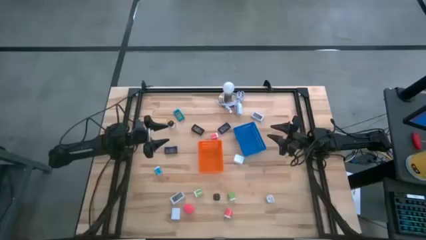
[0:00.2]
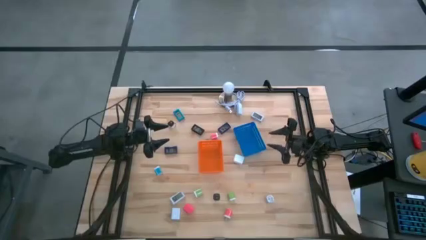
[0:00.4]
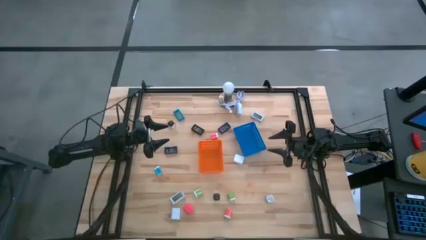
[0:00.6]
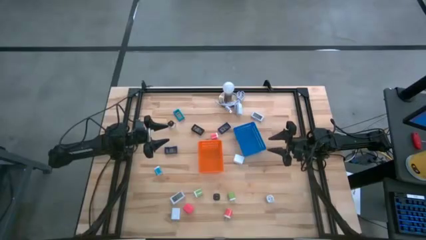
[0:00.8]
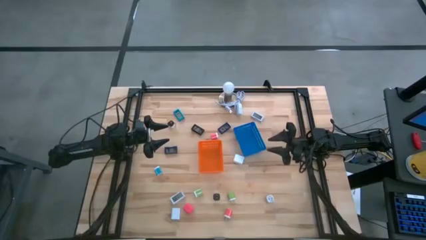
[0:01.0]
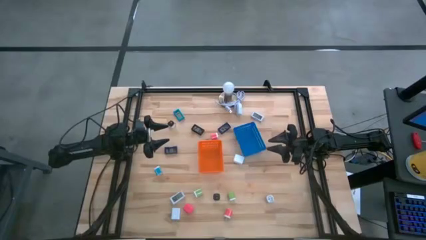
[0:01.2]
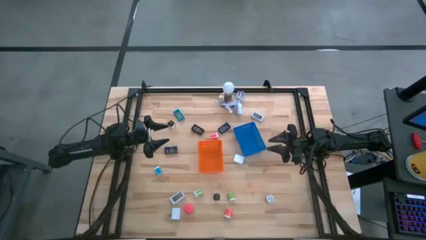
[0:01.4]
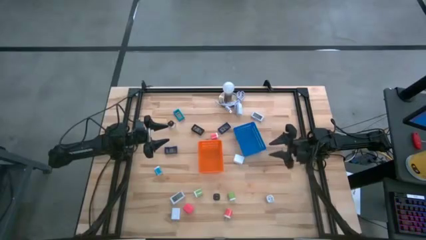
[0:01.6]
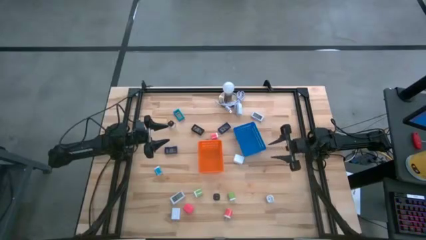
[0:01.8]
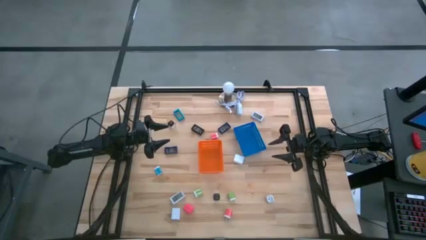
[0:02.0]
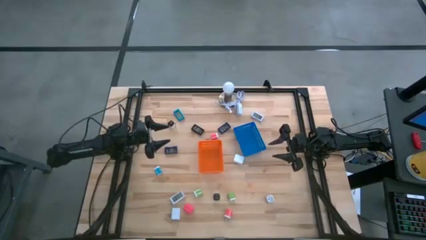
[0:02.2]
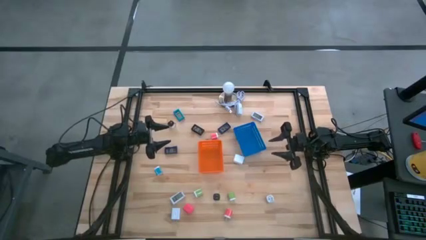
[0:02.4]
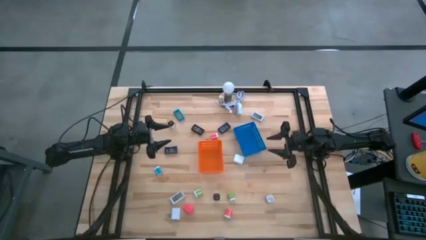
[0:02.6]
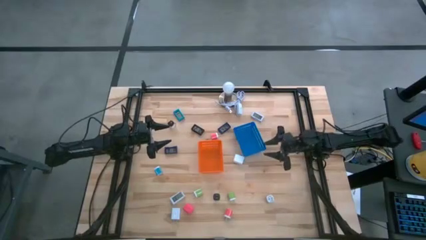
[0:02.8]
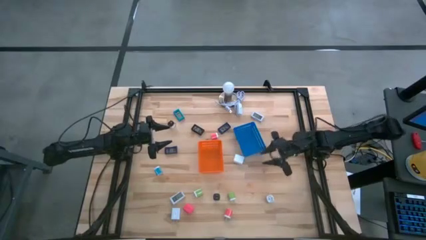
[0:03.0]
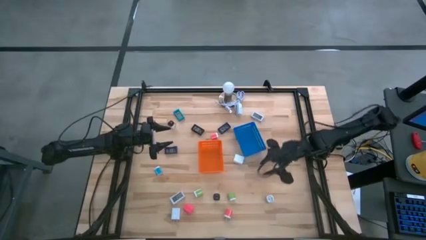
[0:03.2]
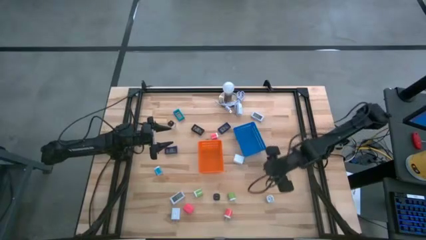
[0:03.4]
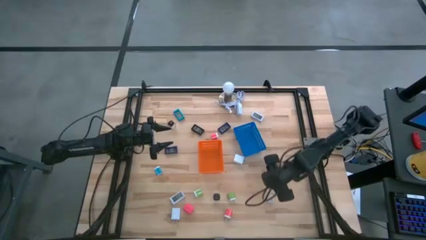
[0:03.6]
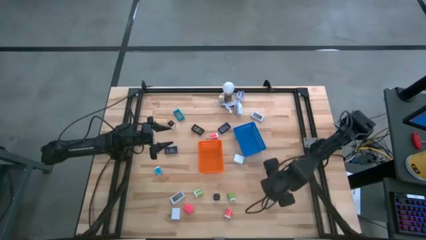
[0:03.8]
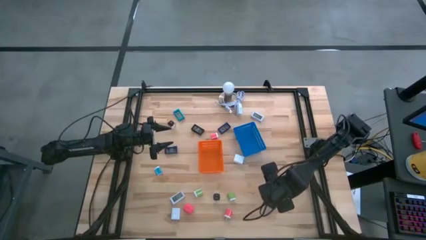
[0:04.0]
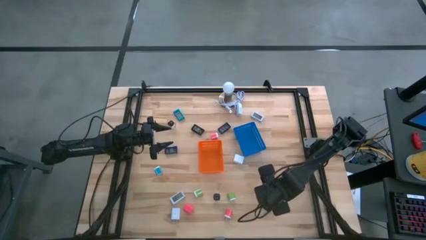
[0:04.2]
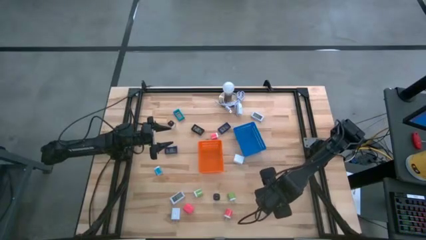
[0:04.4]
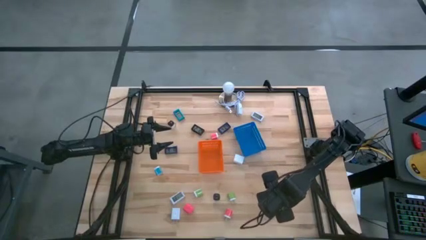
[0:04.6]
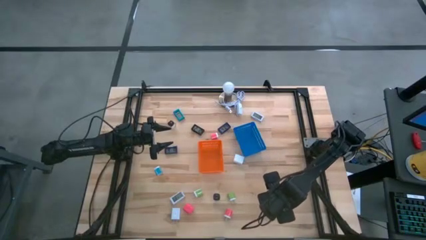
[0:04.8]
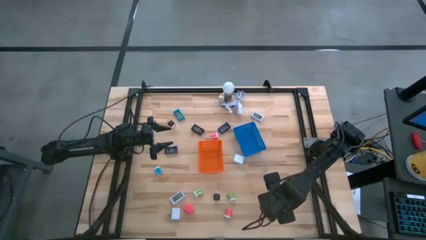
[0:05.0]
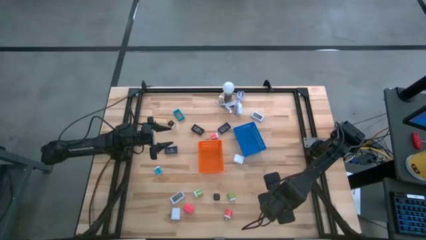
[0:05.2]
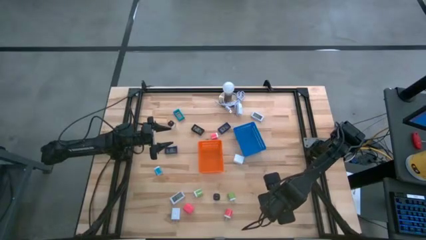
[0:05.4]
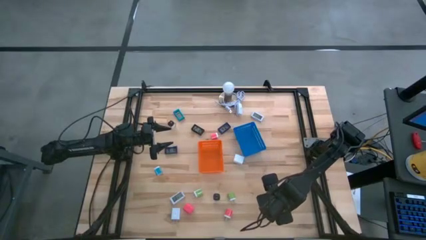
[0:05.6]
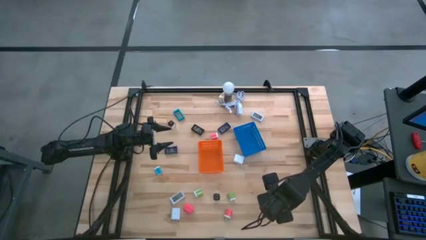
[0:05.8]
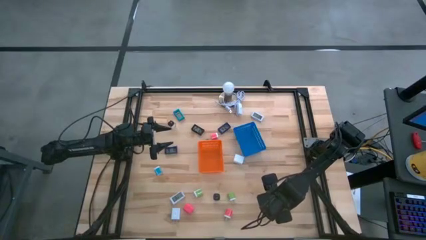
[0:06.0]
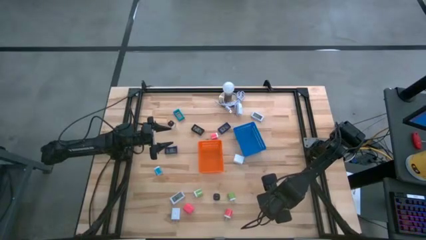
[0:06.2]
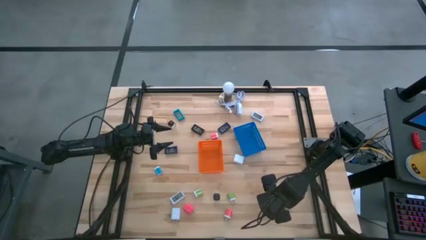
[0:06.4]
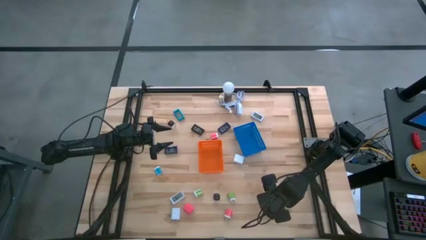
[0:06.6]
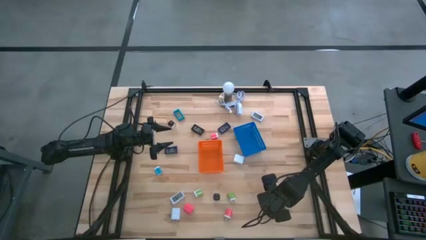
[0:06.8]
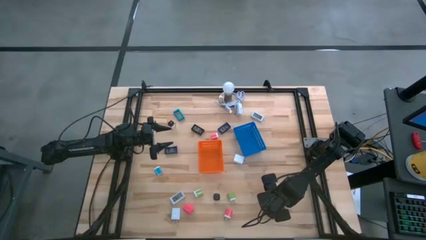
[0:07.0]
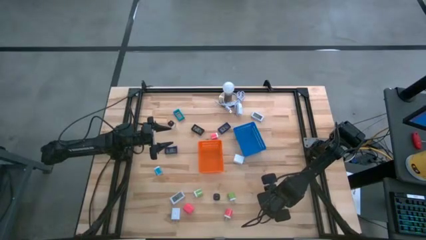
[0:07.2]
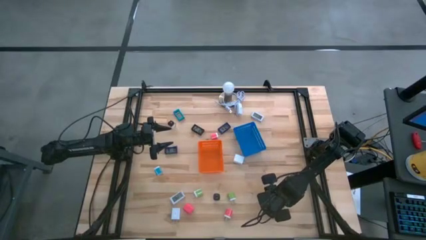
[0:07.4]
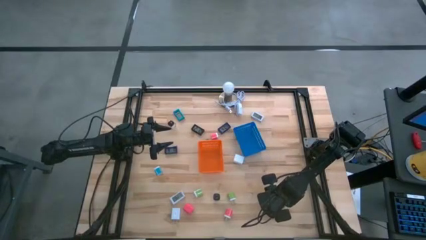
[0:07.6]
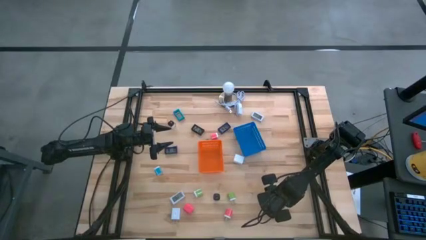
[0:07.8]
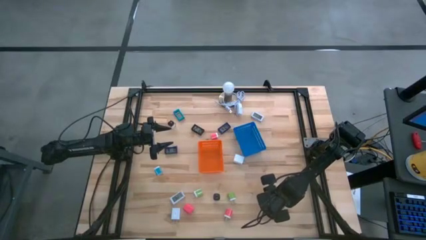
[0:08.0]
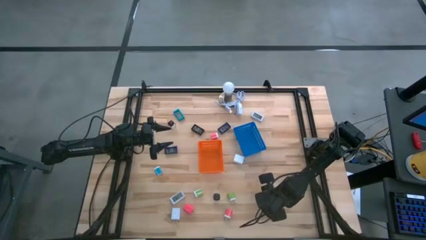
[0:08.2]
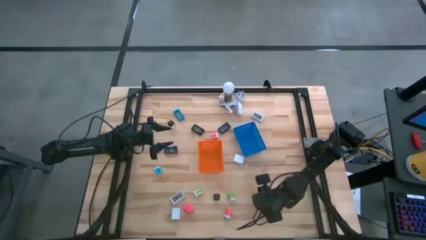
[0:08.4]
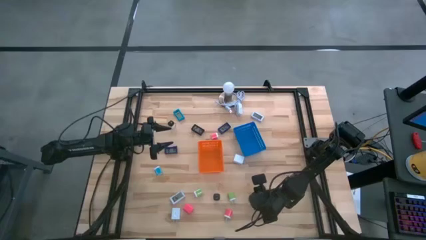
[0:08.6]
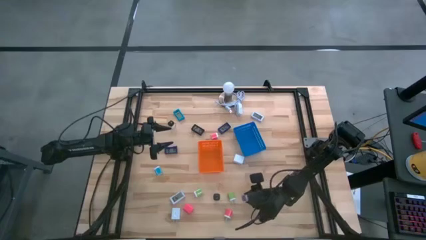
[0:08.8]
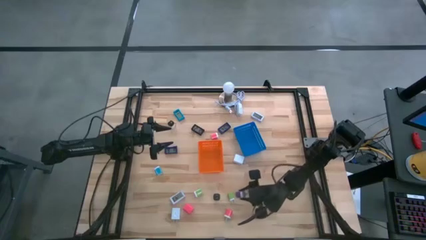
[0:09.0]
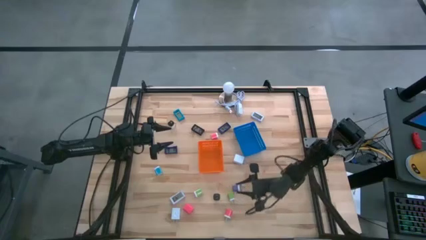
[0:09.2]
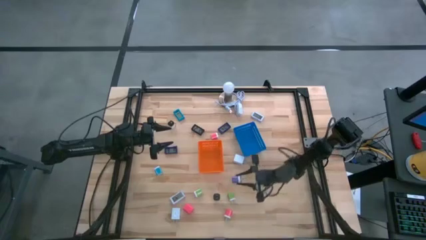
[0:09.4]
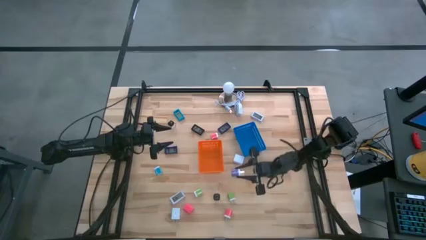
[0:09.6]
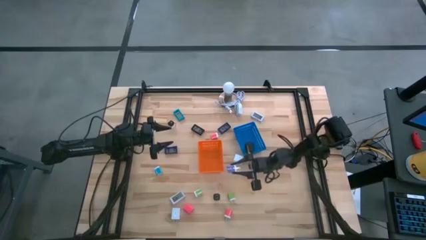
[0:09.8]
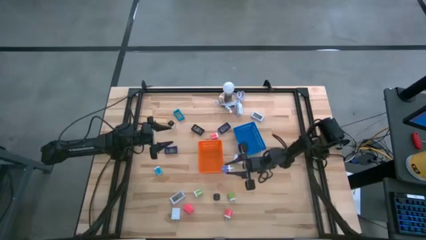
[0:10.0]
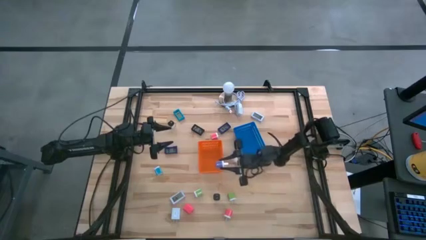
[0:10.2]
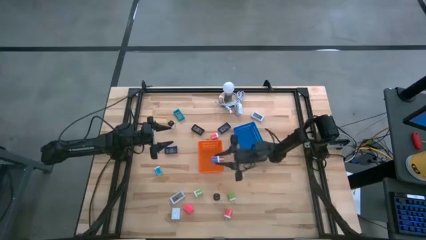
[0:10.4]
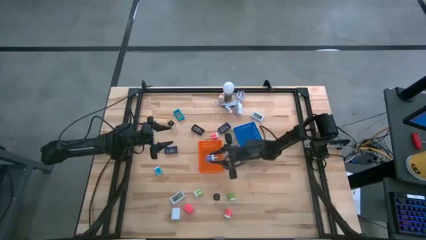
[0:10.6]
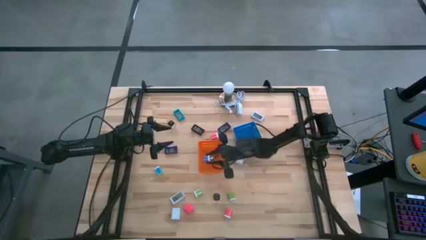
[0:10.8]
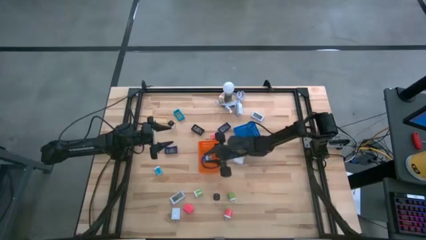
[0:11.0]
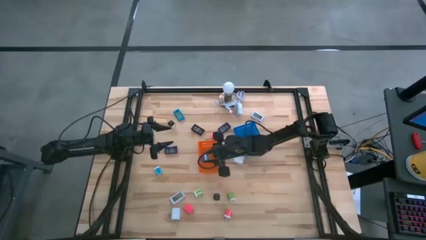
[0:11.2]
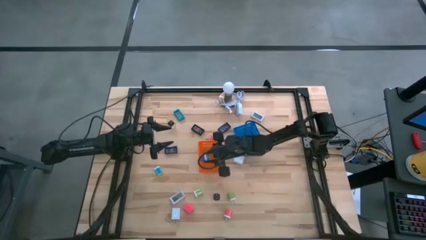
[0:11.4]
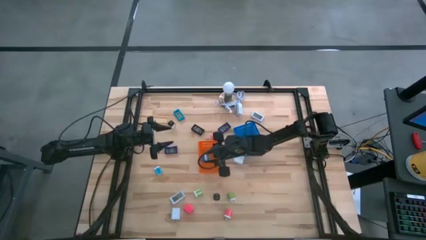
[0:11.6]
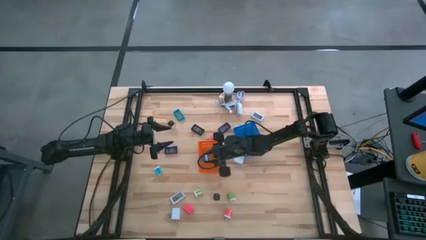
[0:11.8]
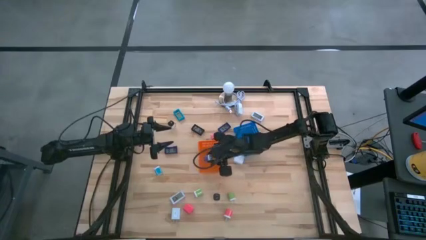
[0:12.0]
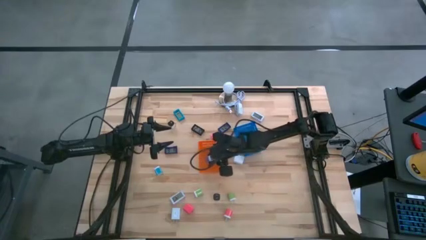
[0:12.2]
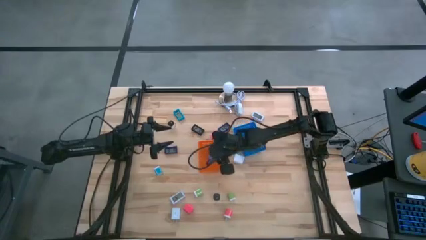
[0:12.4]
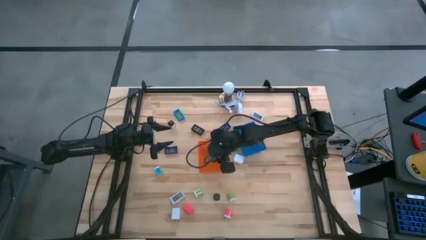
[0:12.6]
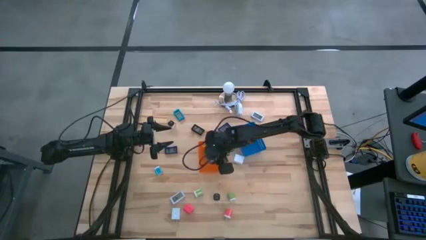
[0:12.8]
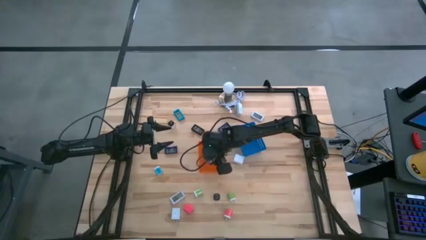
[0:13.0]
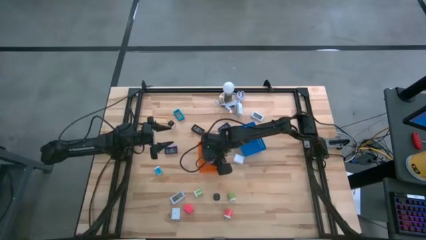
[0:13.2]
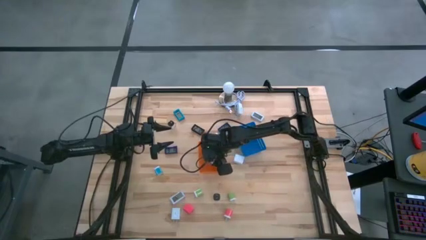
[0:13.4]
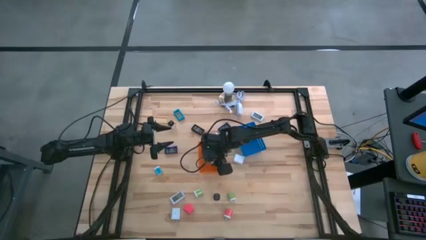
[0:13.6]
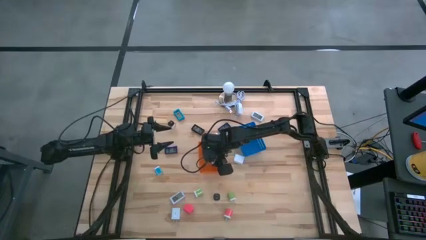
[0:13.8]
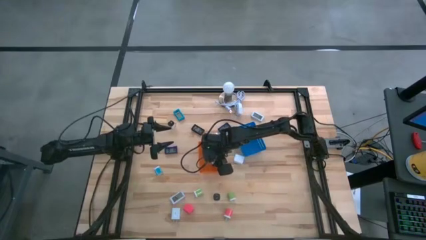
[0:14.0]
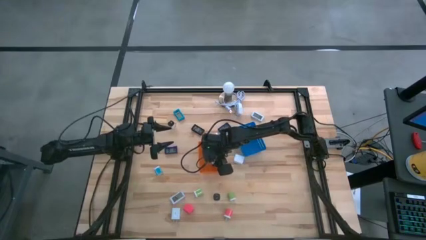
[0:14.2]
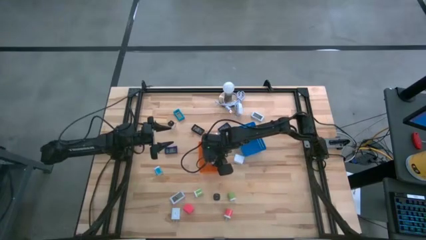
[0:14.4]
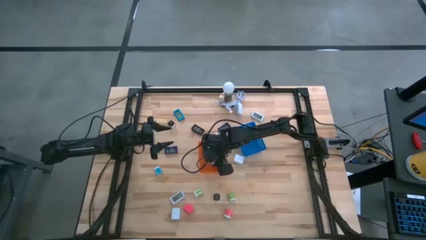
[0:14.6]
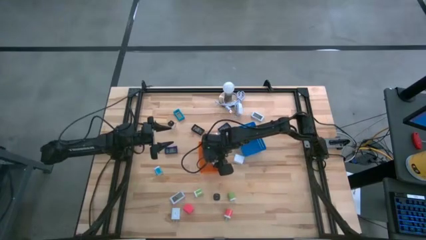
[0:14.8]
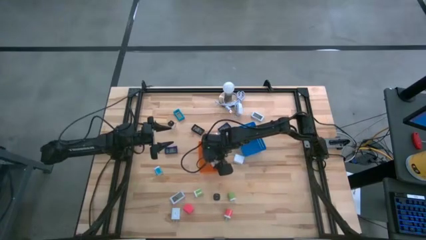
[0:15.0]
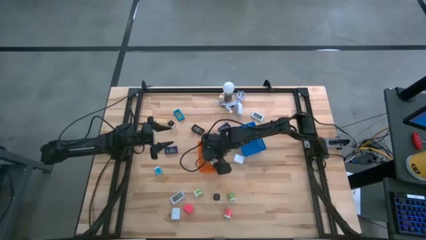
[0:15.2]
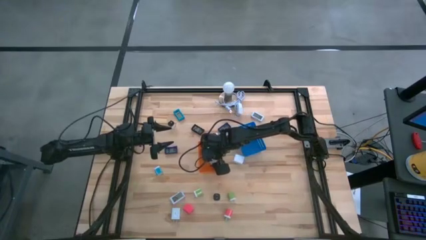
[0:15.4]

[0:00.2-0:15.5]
Task: Pick & Place Office items
Put the violet charger adapter into the orange bin
